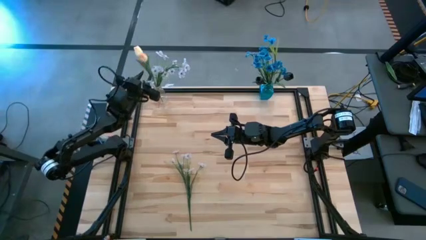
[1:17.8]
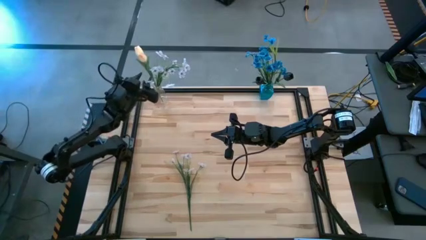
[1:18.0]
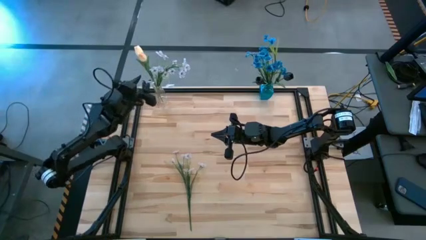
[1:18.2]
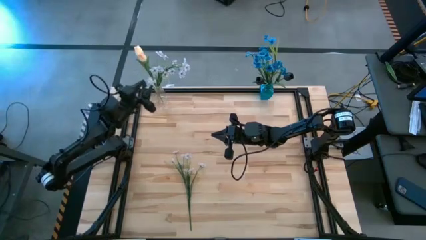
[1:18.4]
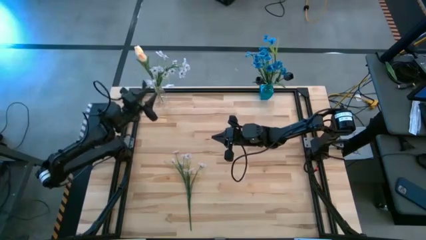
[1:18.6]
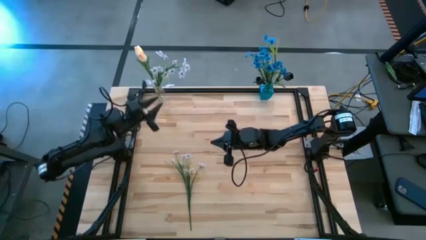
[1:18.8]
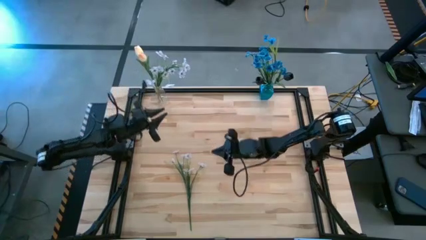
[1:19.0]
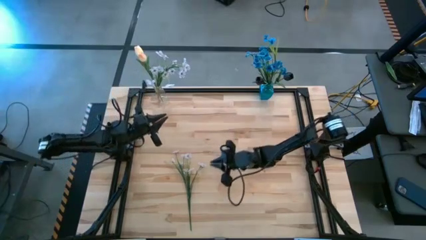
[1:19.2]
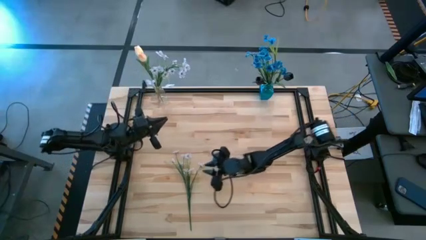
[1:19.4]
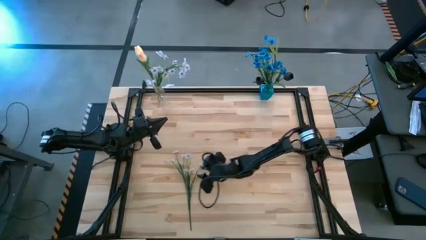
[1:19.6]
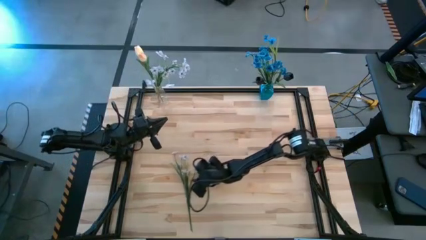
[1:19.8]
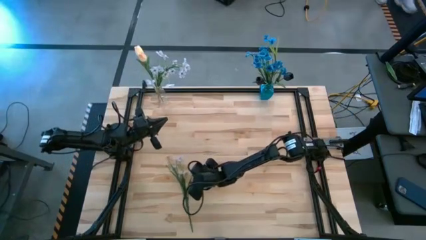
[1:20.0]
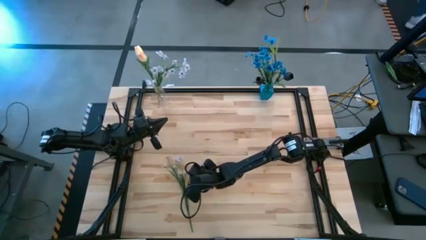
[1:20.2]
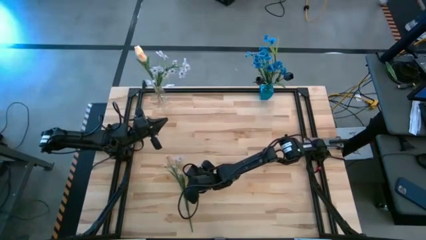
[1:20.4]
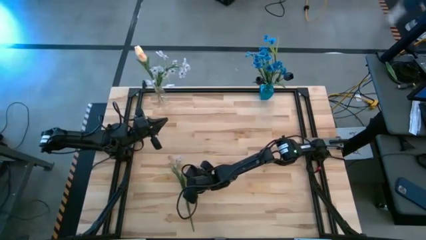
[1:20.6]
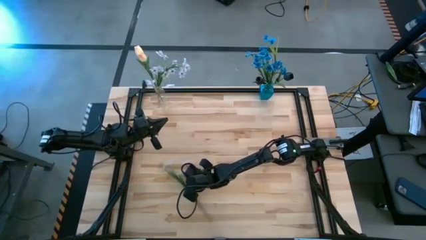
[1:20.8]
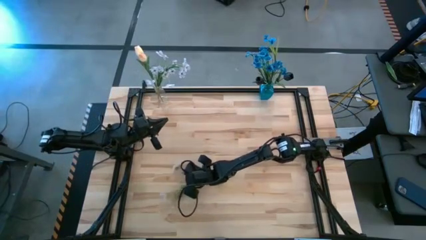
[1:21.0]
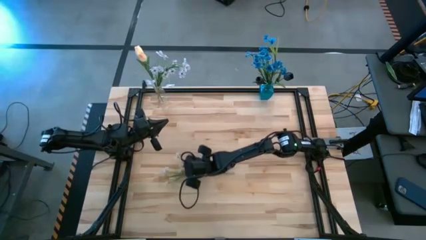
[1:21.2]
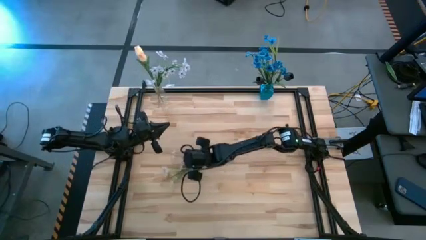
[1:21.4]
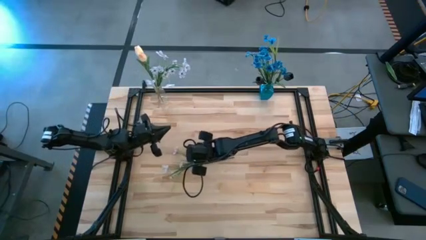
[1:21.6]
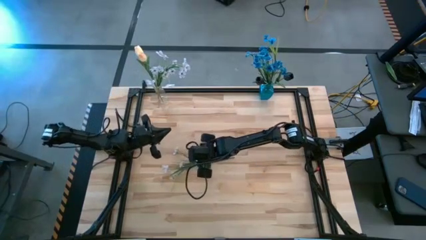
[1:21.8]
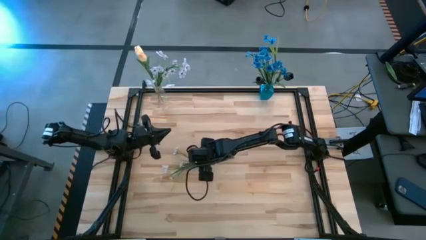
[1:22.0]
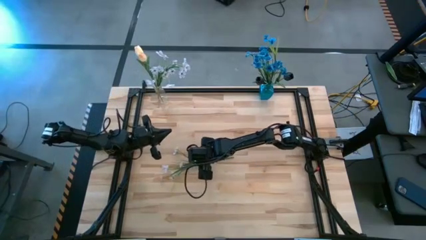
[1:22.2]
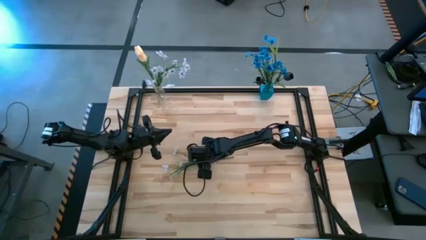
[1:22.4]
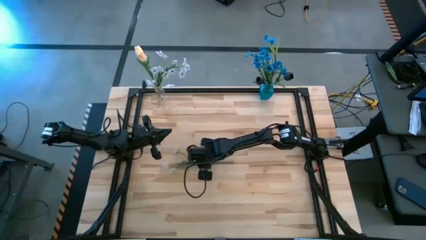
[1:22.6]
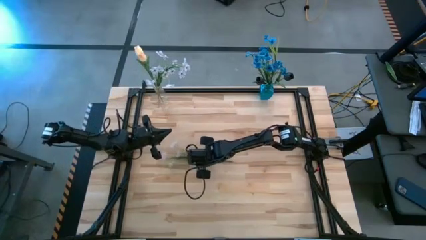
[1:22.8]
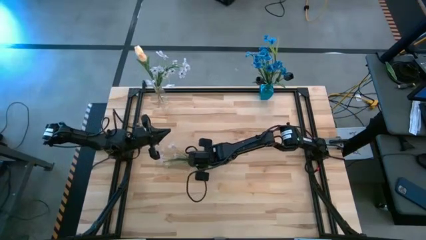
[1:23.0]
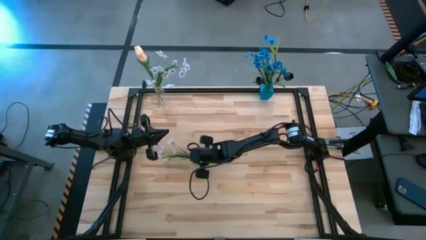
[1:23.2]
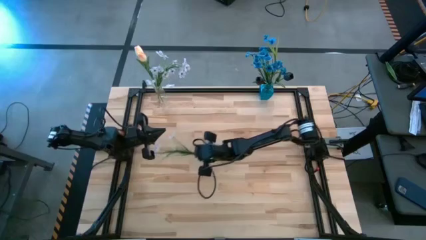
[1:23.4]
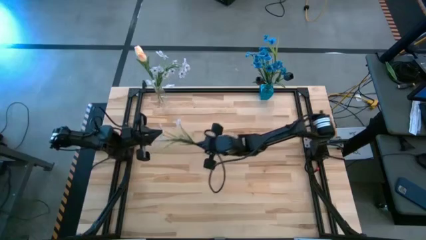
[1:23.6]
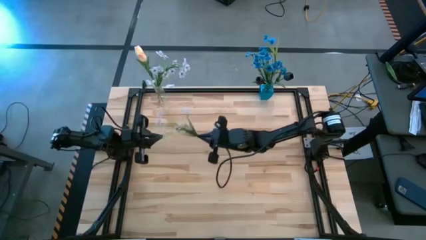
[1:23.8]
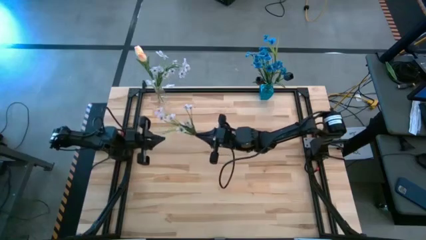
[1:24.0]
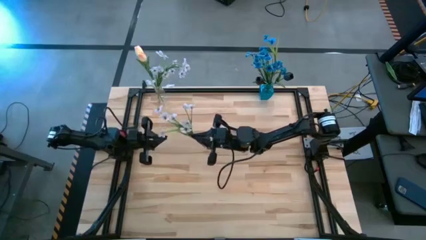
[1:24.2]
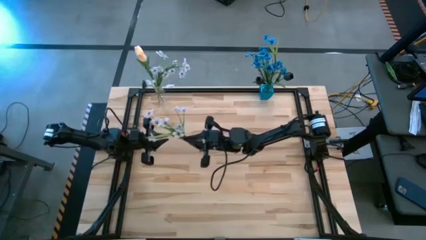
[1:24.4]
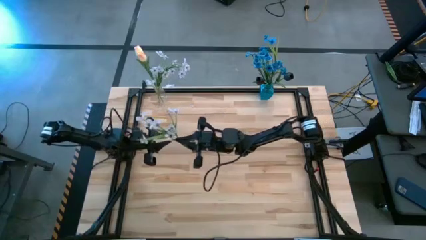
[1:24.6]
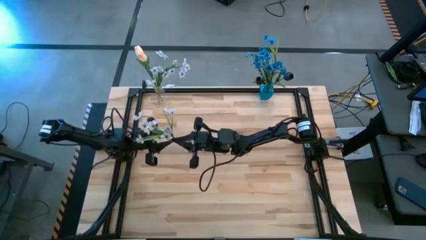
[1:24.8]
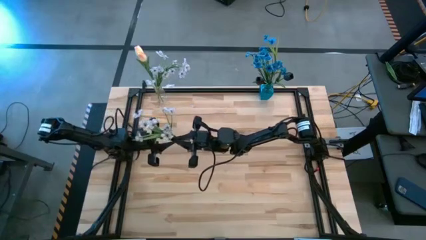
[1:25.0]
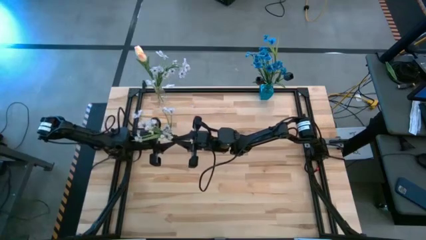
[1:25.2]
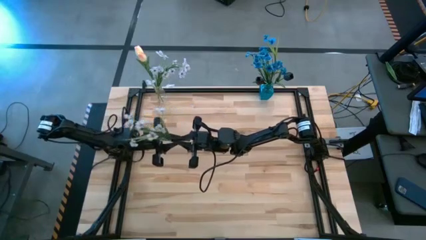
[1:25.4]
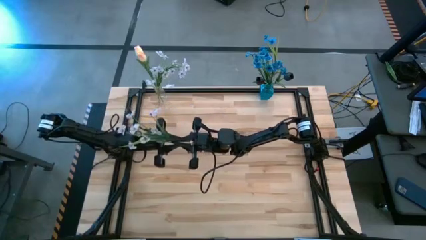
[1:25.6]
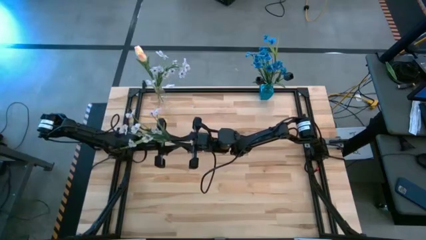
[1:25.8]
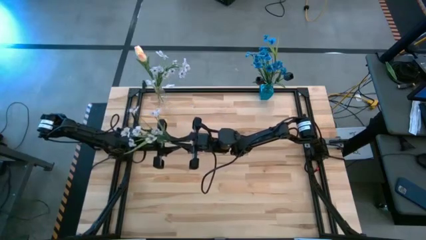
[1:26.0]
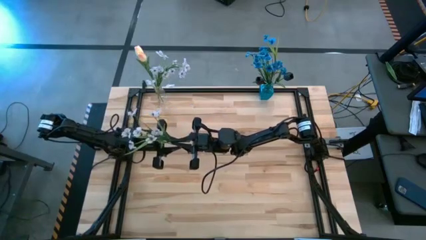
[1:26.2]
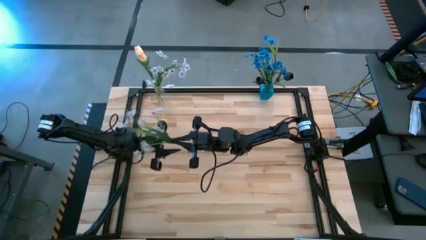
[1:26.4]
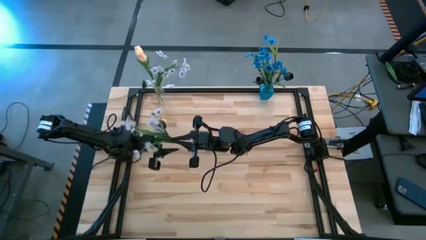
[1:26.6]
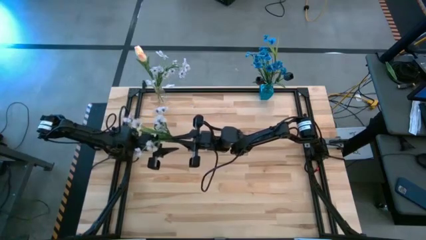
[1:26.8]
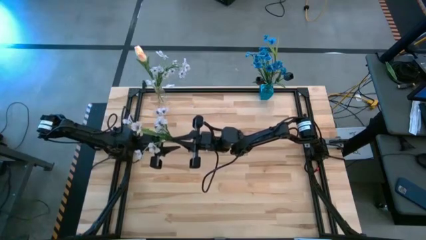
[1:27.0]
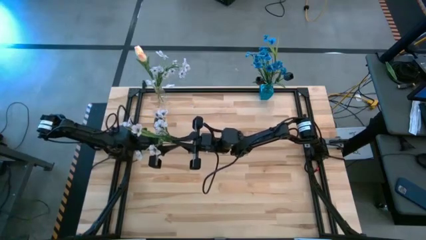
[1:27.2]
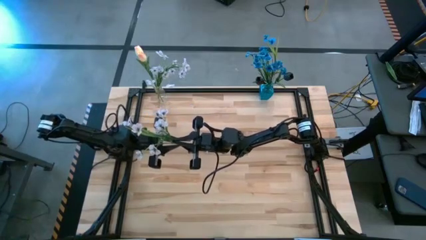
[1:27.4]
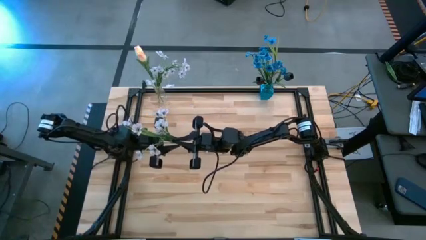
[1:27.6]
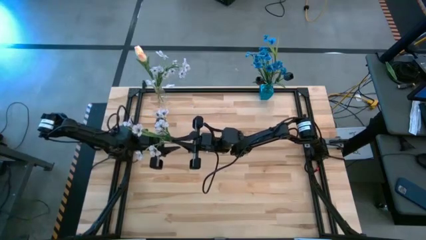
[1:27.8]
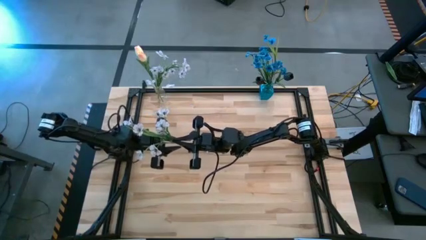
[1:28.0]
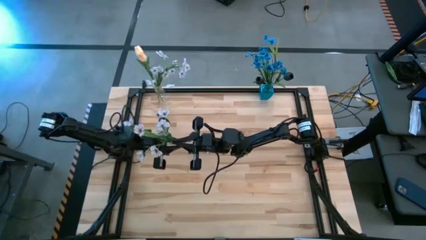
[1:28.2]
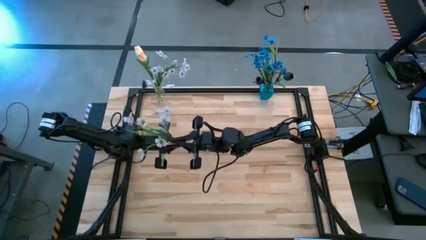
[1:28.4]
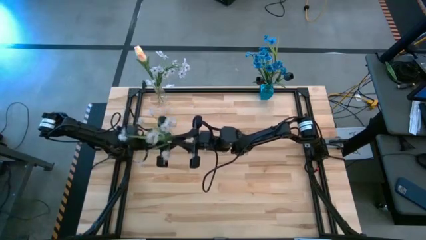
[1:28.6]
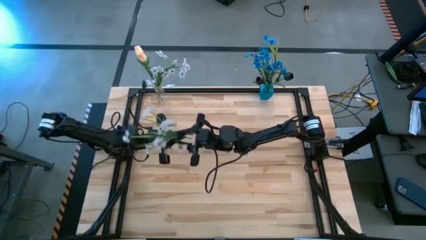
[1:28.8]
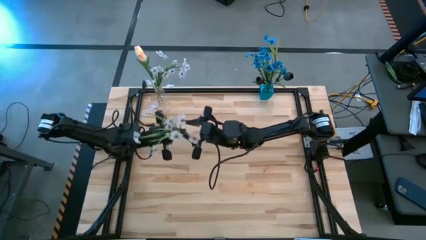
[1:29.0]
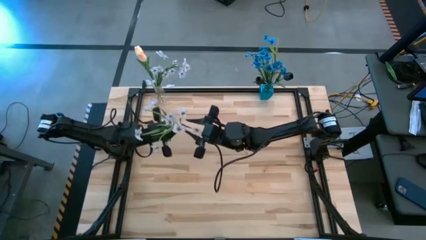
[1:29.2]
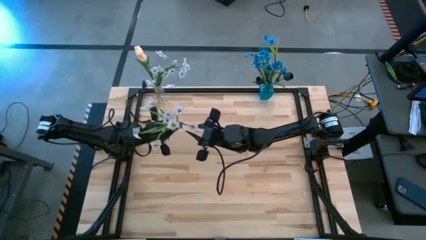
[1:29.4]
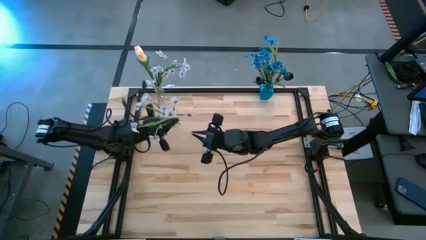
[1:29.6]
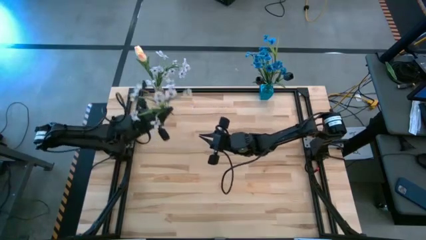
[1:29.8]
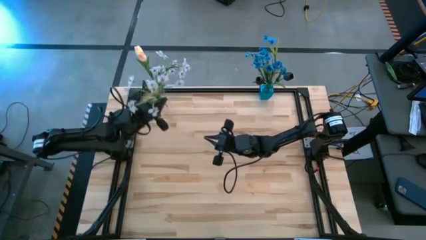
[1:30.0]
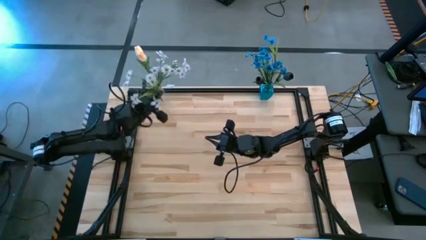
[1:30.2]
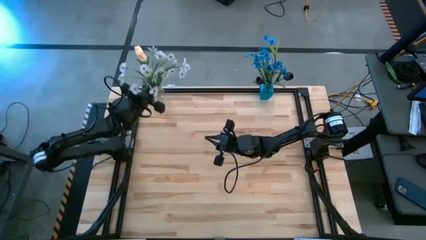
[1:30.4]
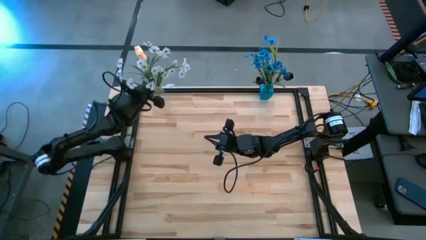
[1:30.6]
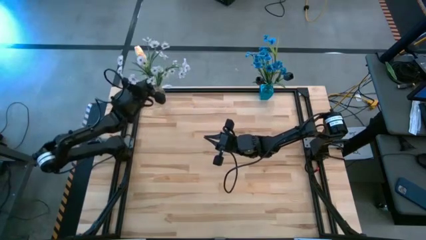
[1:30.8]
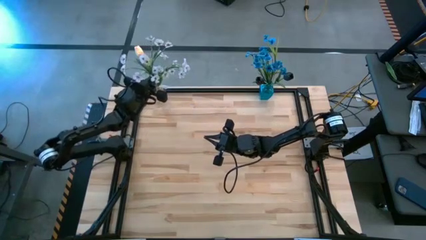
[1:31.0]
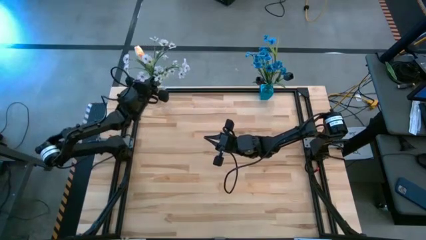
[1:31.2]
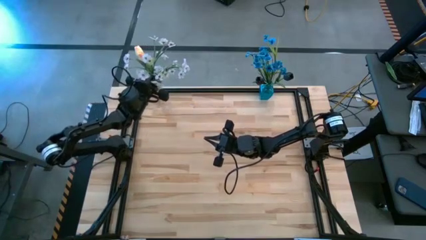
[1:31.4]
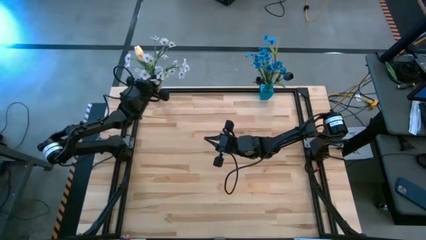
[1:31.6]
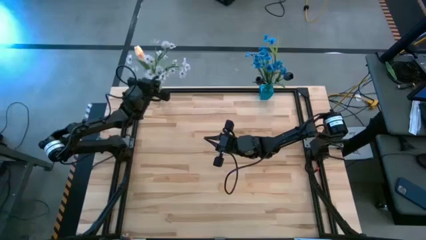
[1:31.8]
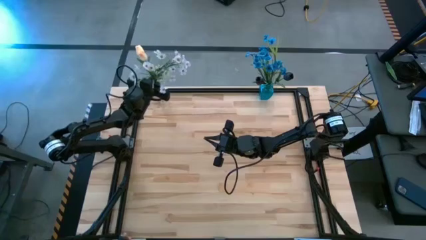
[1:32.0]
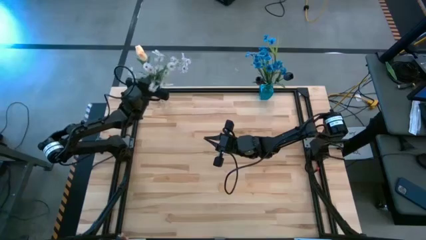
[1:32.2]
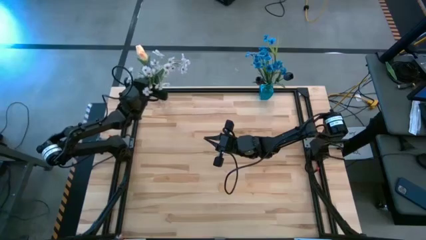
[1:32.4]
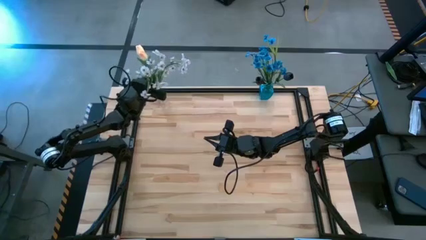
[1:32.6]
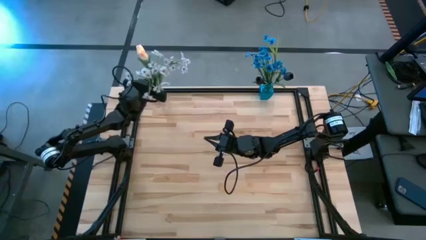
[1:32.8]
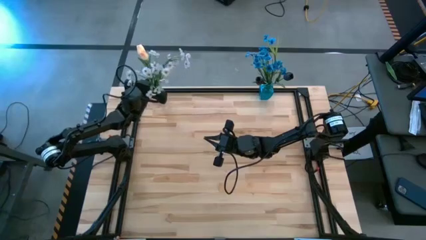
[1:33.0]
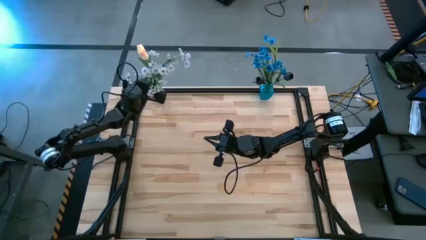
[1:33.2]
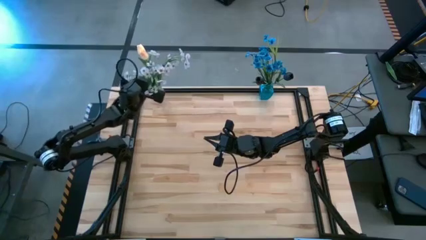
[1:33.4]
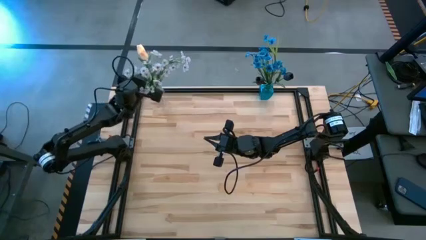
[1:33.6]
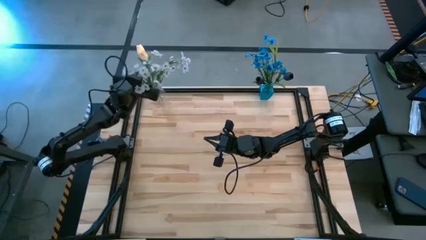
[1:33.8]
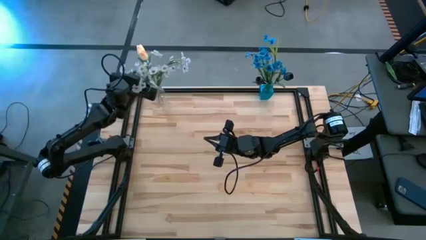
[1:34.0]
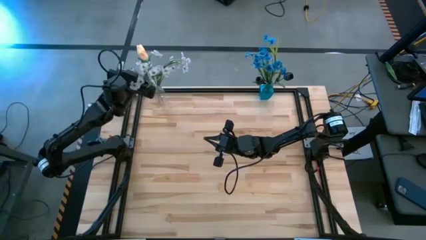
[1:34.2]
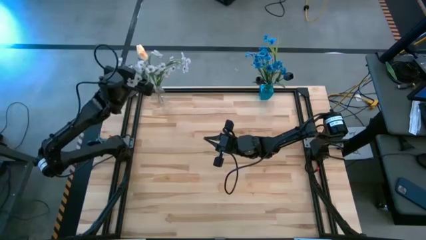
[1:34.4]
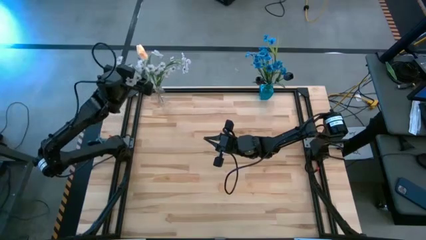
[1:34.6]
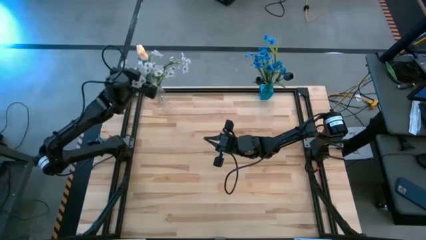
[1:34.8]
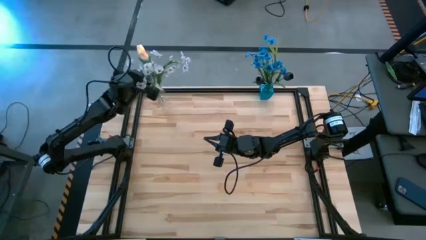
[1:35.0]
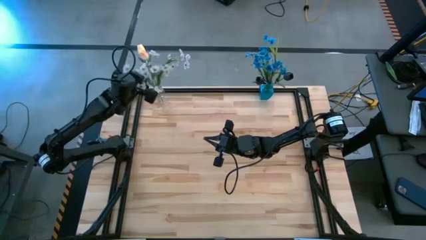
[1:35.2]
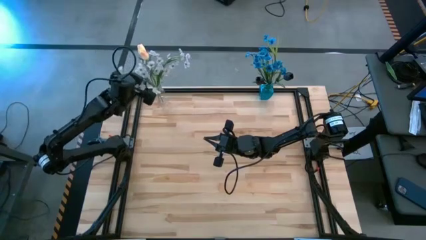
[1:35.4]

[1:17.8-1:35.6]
Task: Sort flowers into vase by color
Put the white flower into the transparent vase
